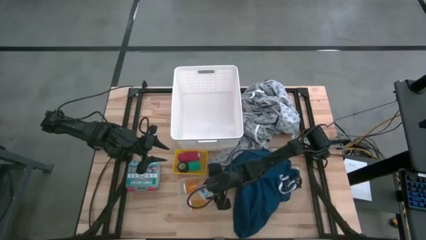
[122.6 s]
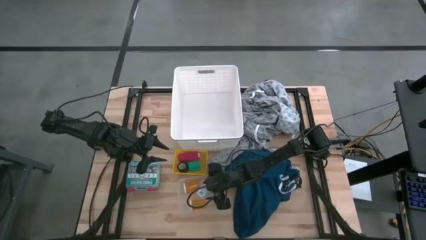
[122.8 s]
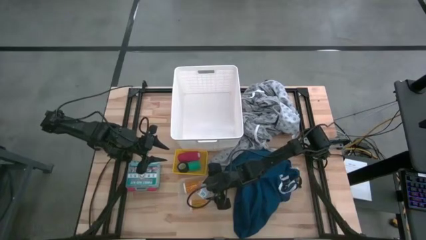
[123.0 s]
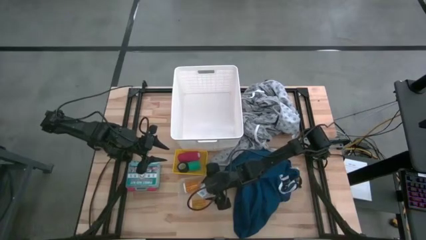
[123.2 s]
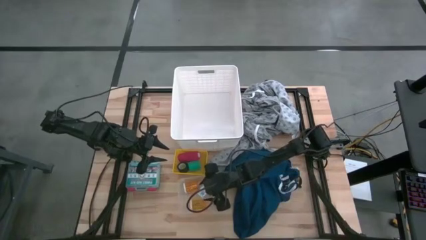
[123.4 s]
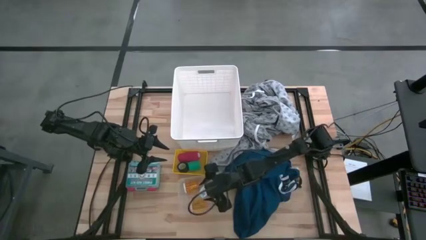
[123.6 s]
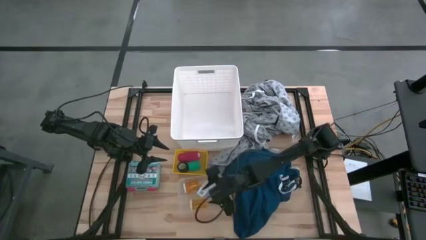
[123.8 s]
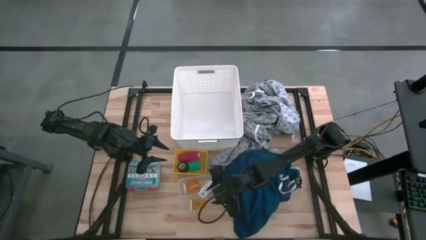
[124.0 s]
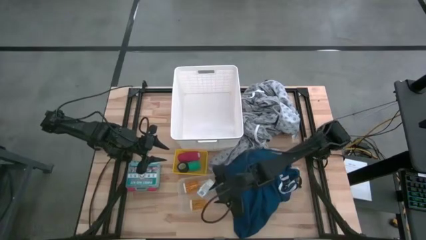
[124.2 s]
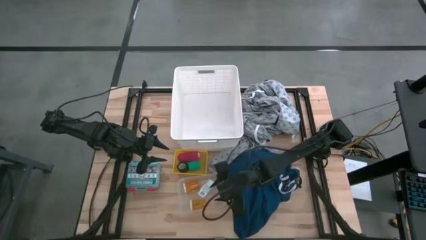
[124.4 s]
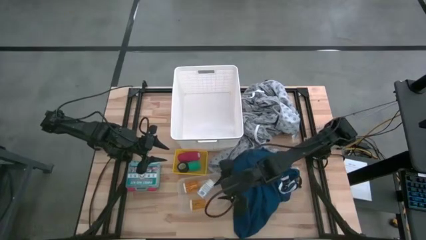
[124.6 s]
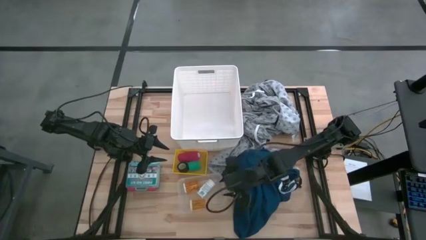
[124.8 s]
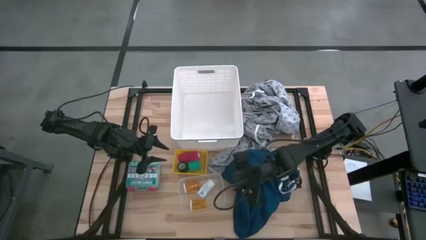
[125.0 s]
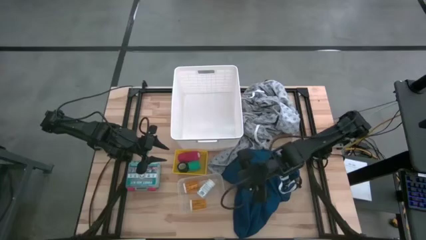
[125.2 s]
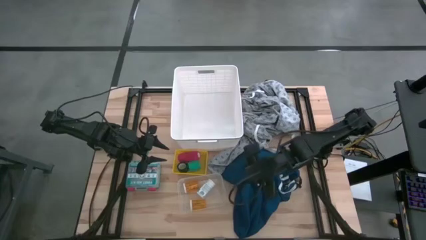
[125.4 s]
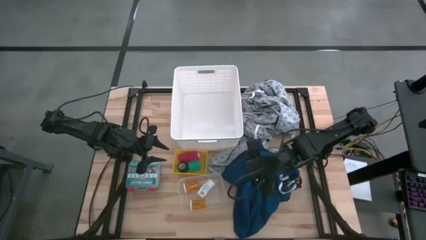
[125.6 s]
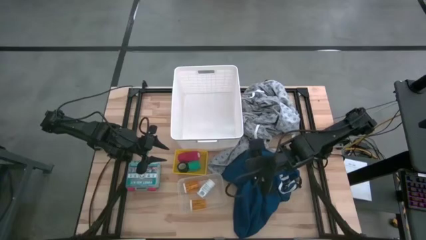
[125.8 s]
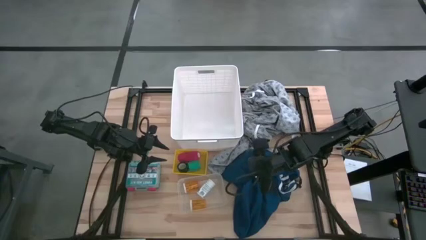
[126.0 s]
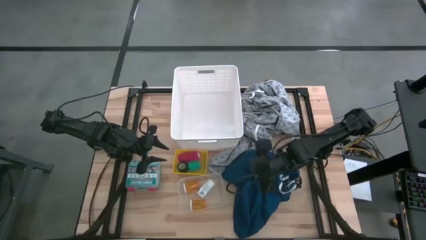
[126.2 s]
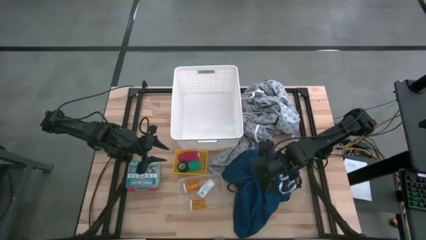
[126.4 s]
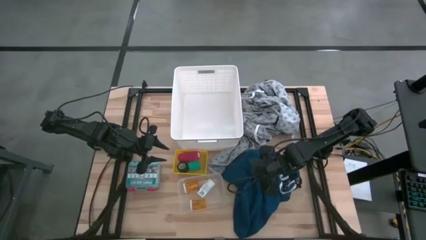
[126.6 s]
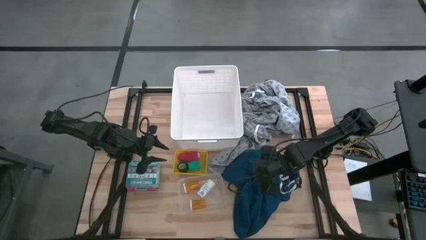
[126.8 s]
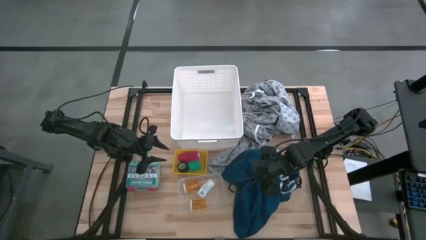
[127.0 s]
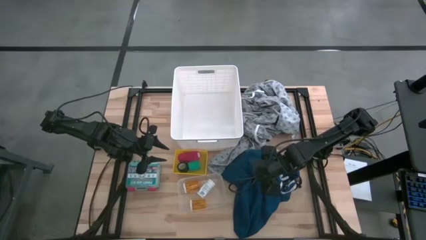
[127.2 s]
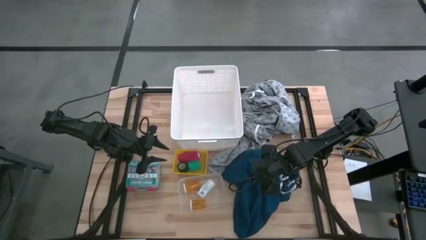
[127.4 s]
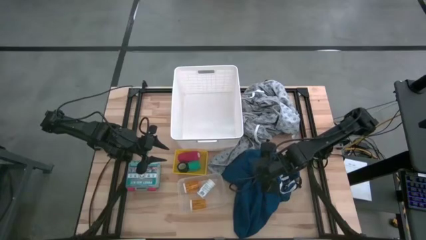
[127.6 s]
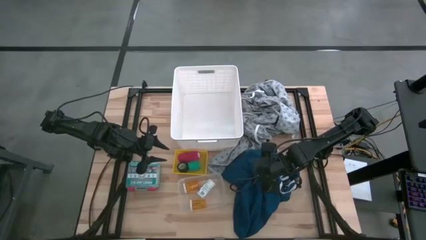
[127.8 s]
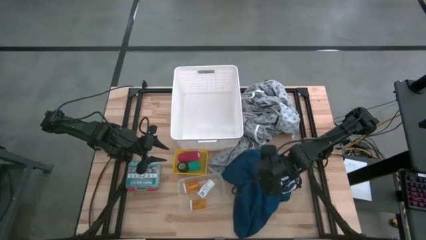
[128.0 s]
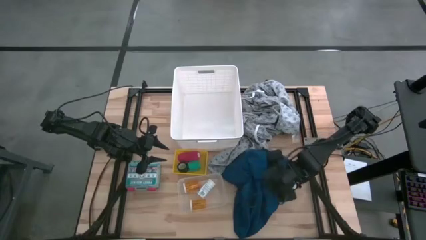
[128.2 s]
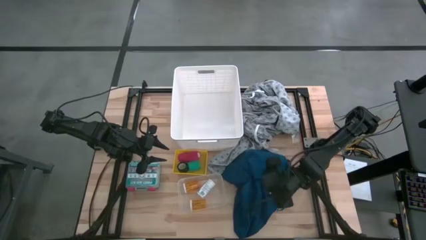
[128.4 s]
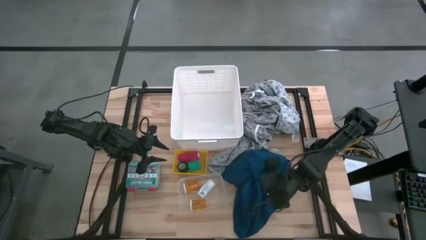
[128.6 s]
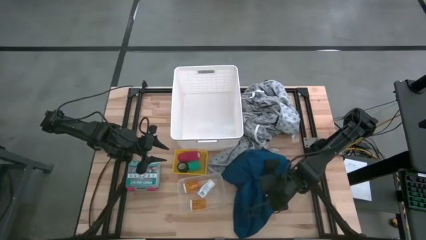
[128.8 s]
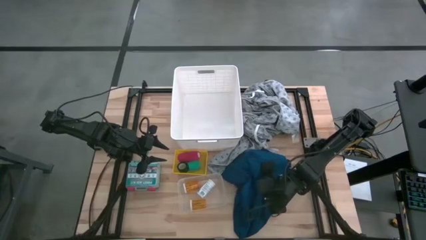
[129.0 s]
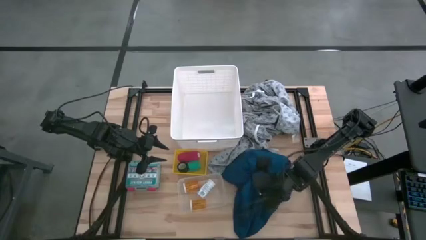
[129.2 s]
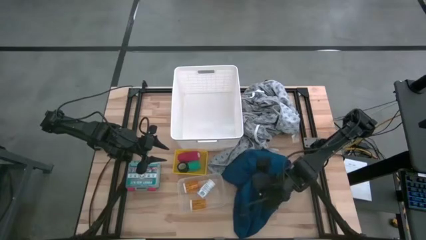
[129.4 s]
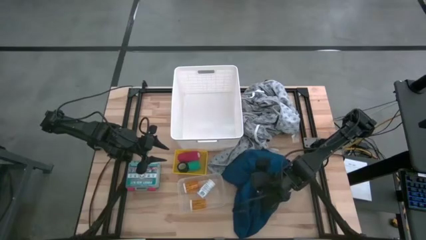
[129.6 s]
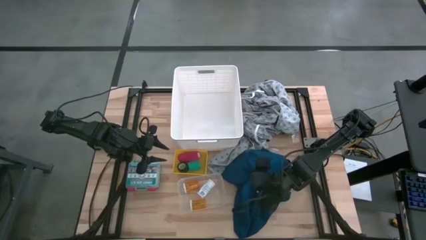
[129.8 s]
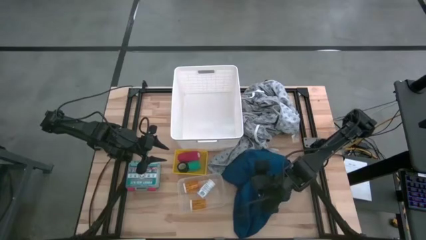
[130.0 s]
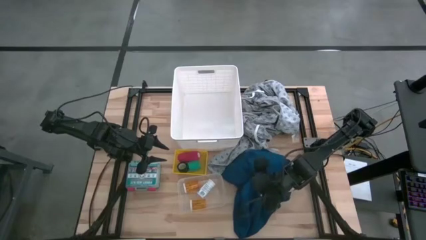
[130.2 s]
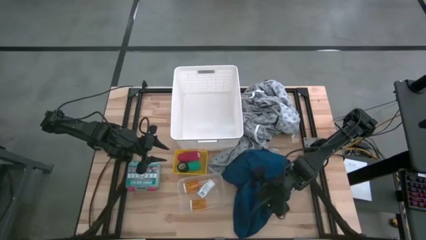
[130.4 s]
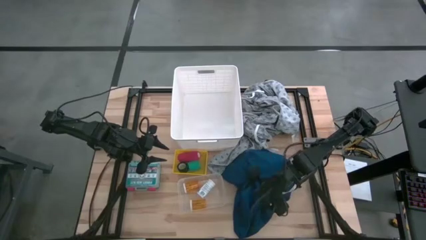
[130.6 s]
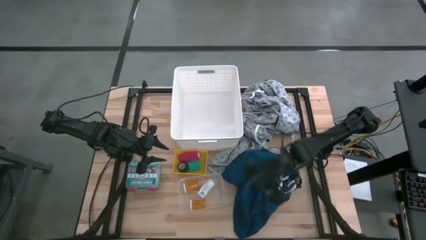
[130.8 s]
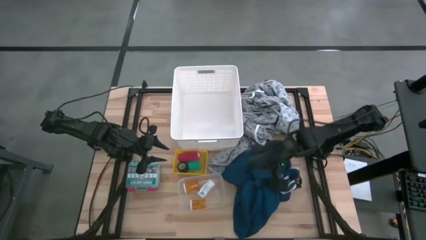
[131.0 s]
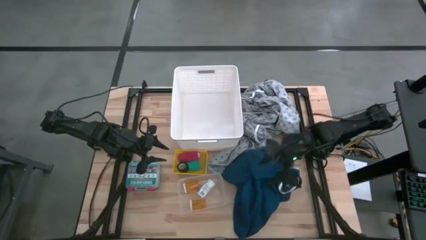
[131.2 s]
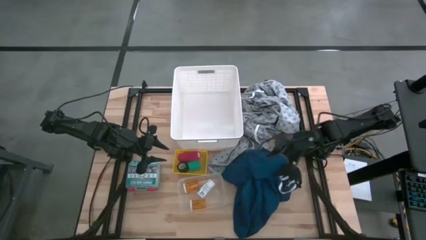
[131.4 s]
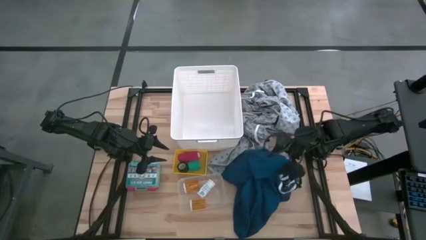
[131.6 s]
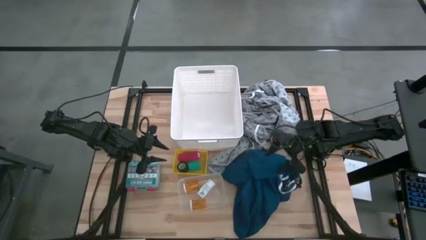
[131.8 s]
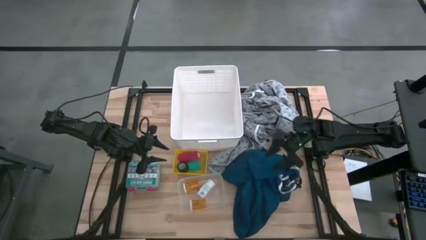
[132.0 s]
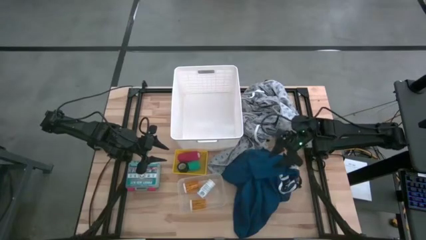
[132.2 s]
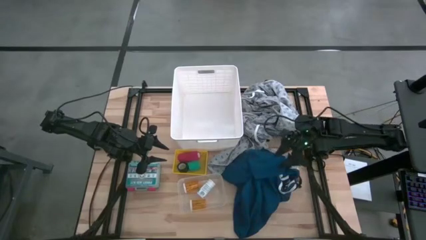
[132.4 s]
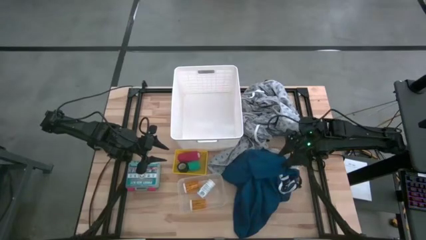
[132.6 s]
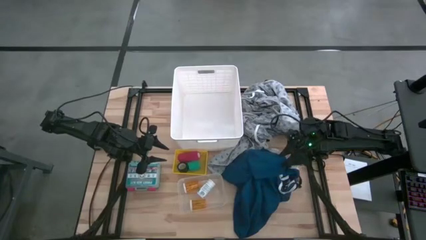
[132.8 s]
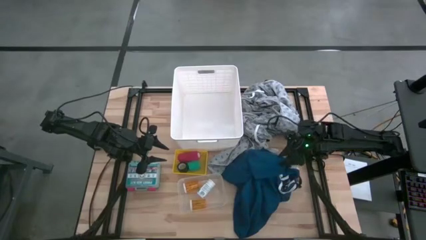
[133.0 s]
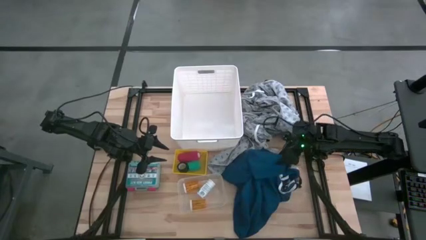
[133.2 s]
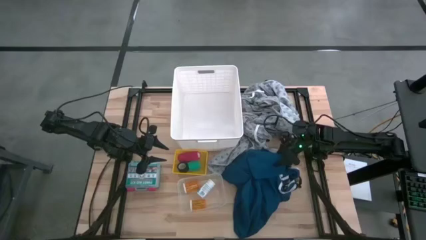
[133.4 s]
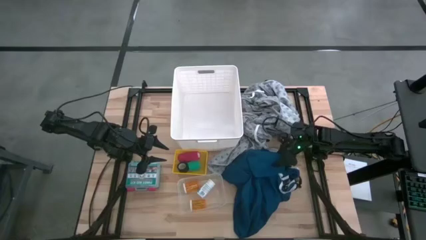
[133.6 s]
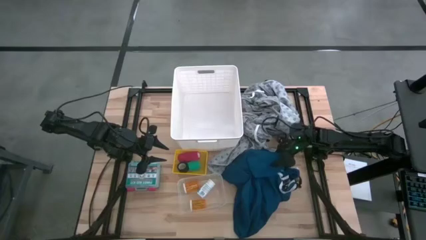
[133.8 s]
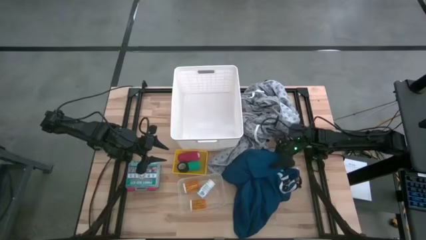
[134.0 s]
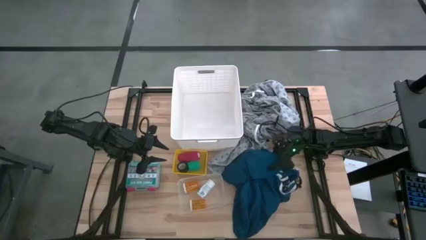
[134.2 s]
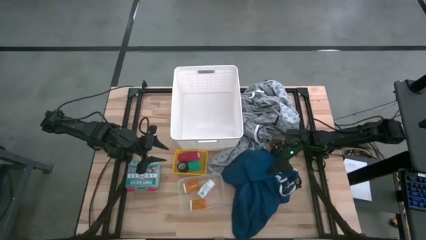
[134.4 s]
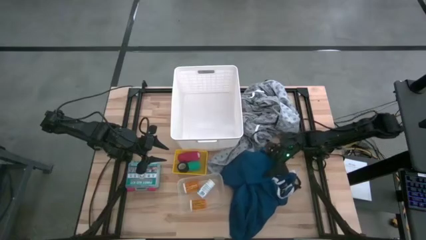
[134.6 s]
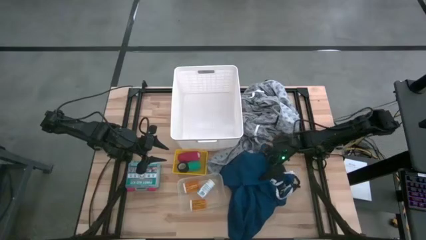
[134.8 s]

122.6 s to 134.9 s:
Task: Pick & Place Medicine items
Put the blue lapover patient gown into the white laundry bin
